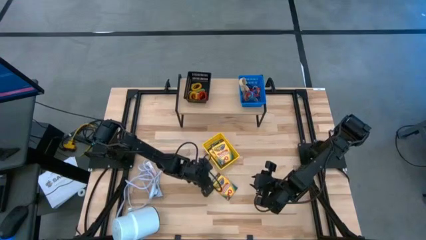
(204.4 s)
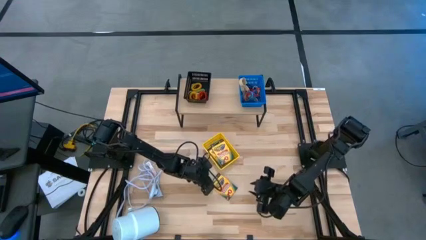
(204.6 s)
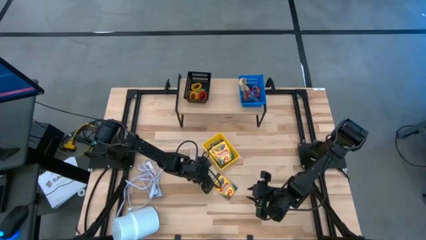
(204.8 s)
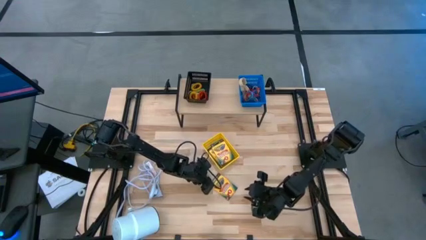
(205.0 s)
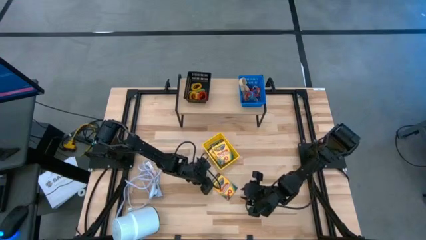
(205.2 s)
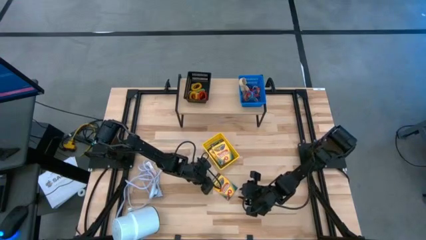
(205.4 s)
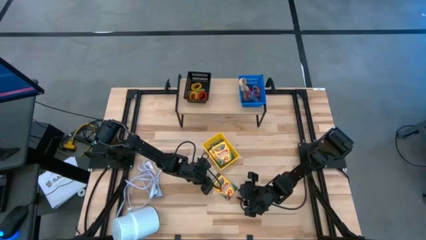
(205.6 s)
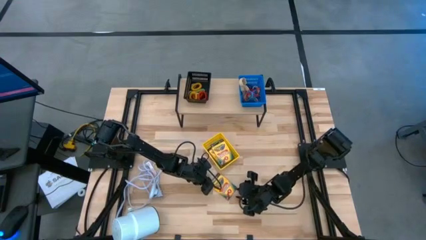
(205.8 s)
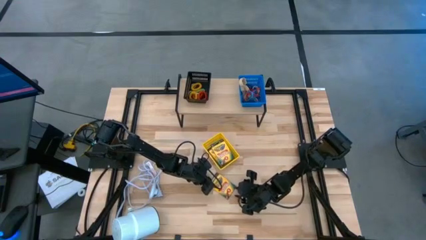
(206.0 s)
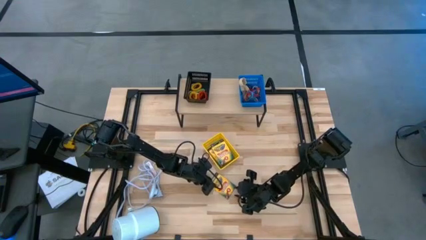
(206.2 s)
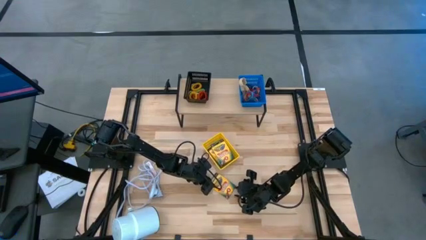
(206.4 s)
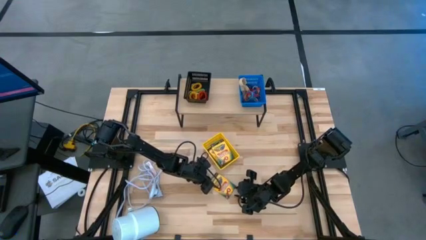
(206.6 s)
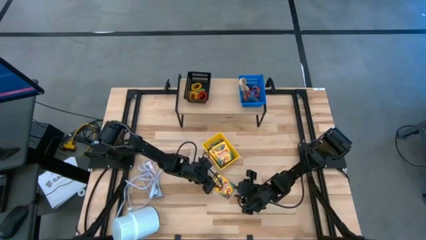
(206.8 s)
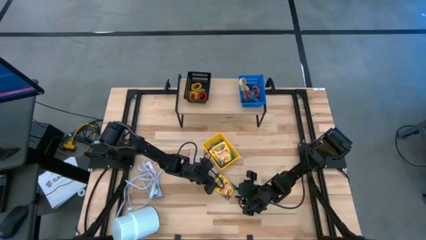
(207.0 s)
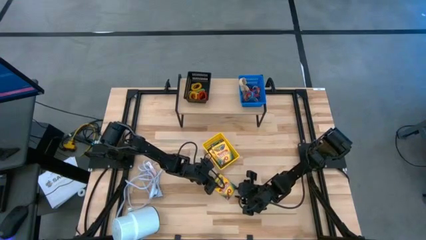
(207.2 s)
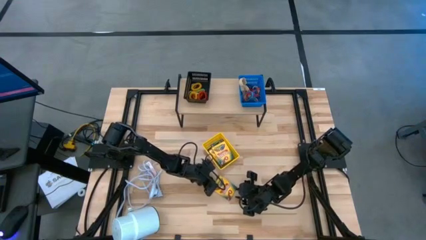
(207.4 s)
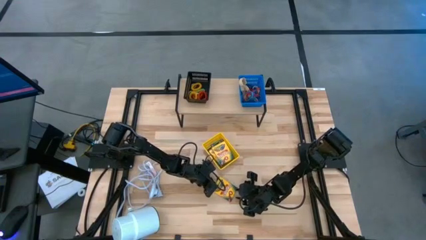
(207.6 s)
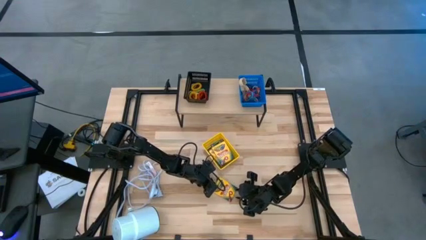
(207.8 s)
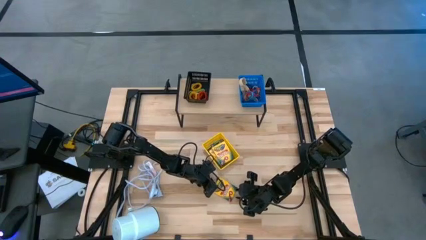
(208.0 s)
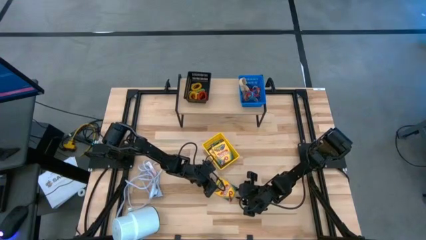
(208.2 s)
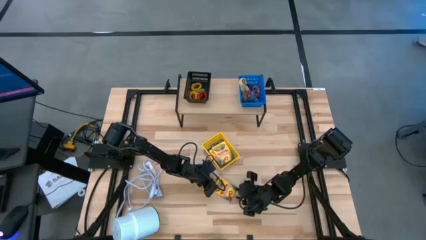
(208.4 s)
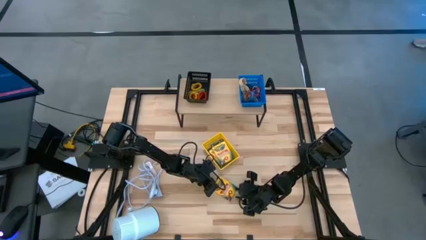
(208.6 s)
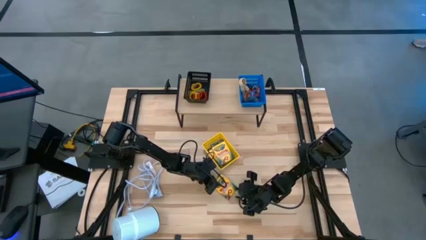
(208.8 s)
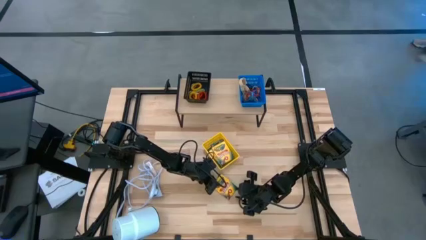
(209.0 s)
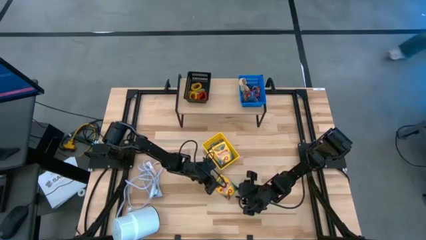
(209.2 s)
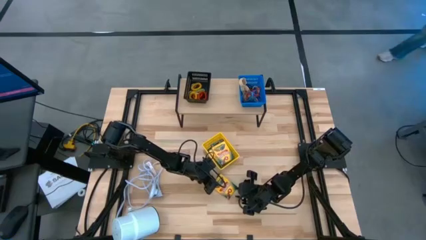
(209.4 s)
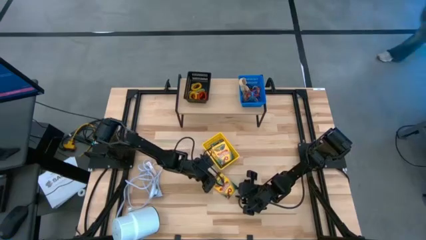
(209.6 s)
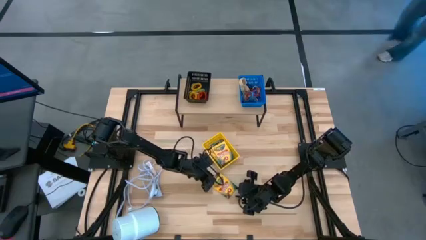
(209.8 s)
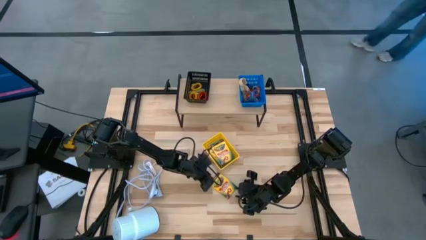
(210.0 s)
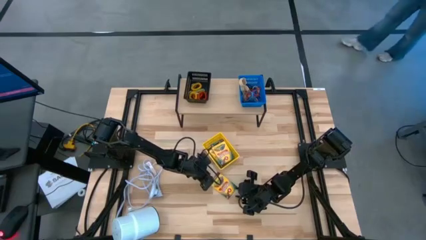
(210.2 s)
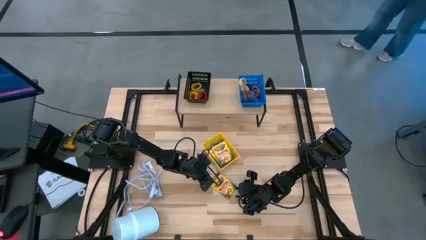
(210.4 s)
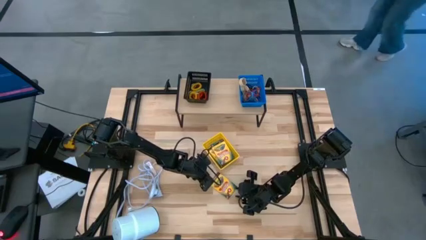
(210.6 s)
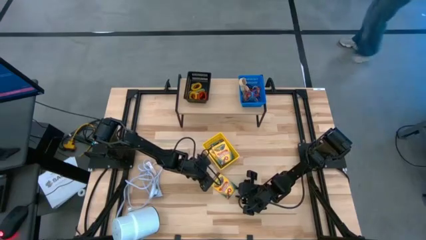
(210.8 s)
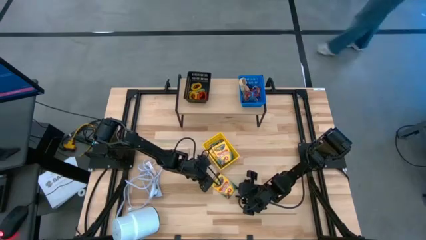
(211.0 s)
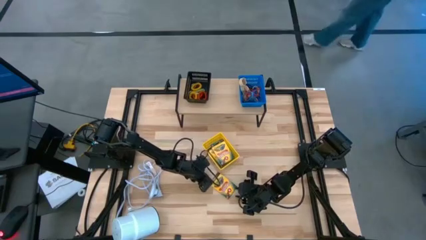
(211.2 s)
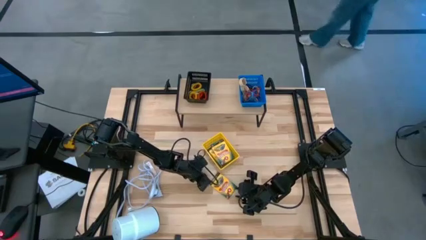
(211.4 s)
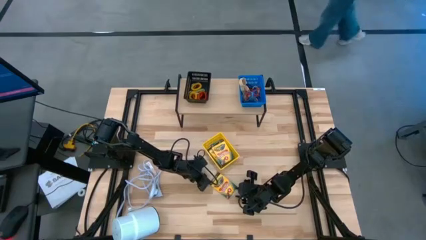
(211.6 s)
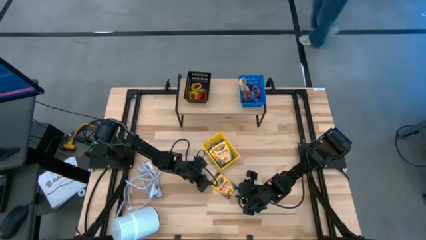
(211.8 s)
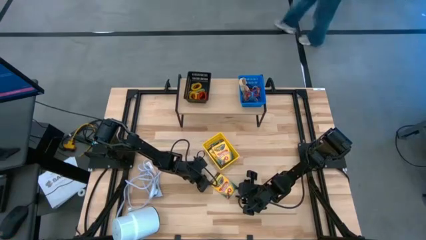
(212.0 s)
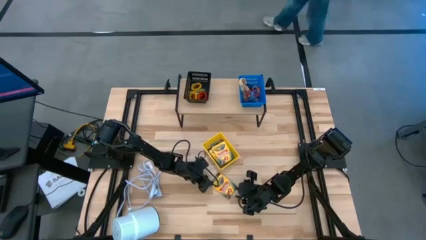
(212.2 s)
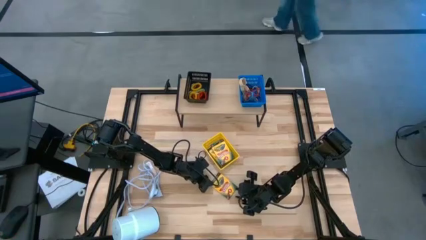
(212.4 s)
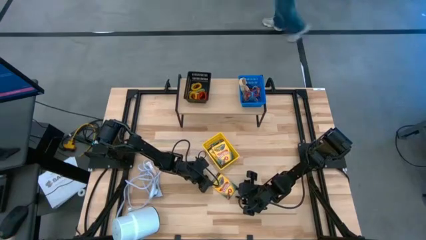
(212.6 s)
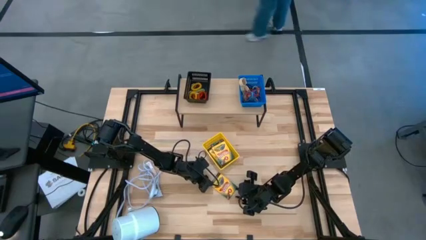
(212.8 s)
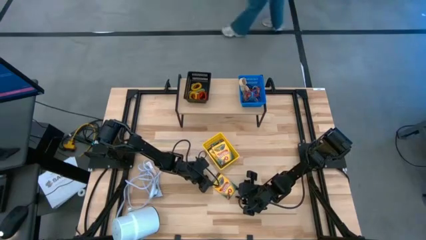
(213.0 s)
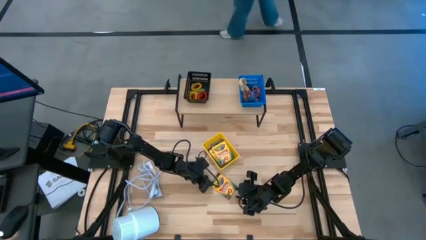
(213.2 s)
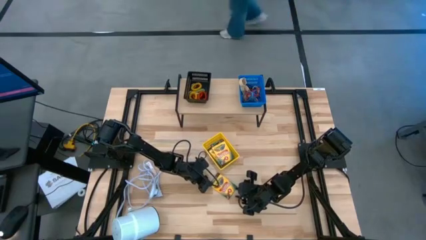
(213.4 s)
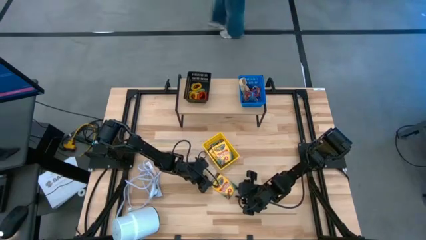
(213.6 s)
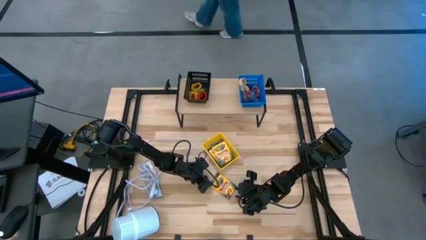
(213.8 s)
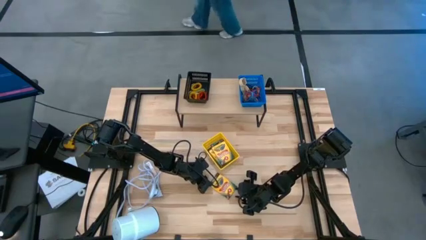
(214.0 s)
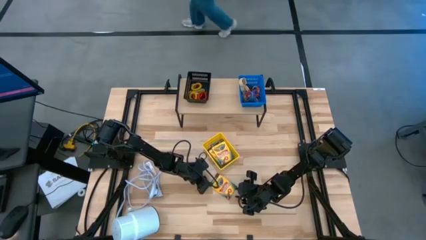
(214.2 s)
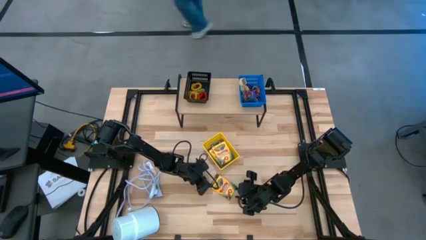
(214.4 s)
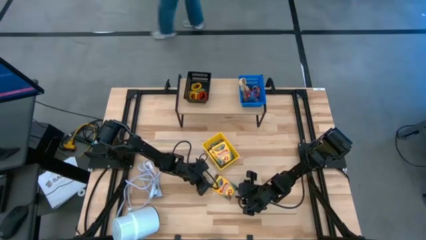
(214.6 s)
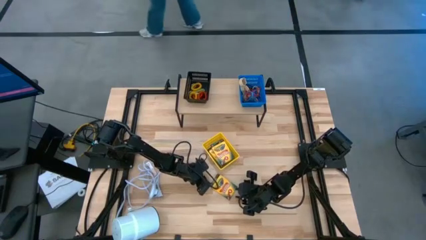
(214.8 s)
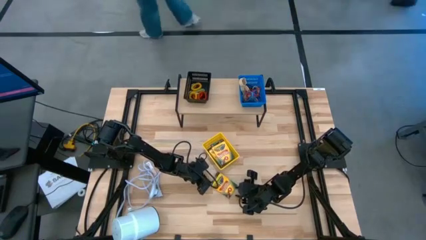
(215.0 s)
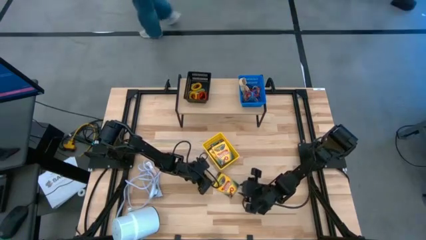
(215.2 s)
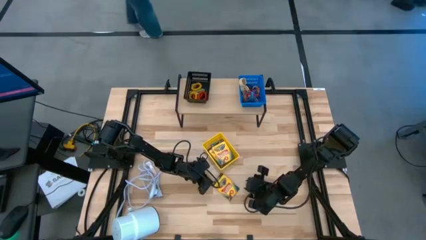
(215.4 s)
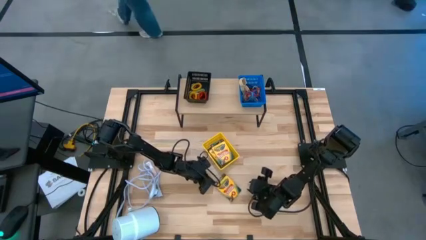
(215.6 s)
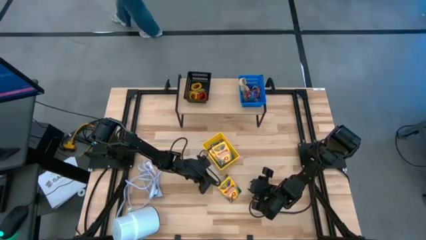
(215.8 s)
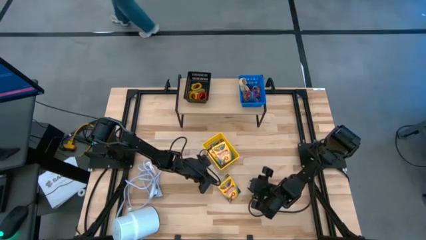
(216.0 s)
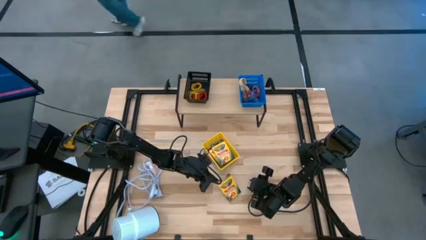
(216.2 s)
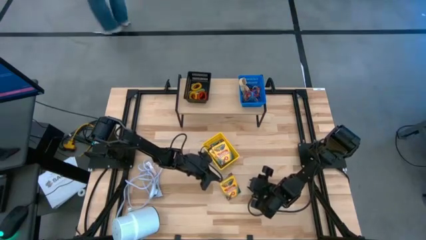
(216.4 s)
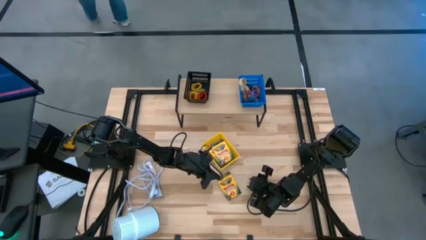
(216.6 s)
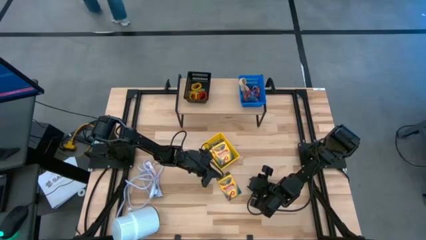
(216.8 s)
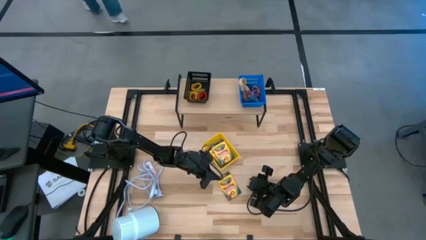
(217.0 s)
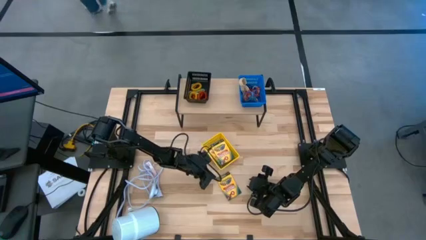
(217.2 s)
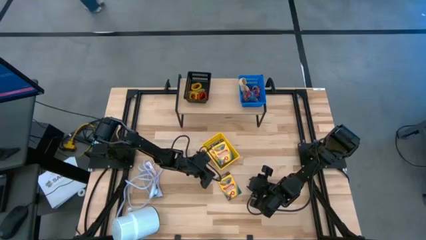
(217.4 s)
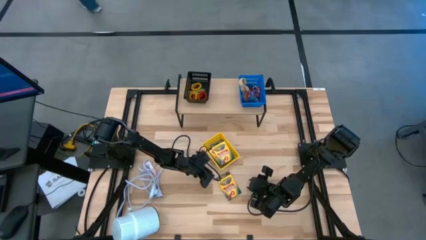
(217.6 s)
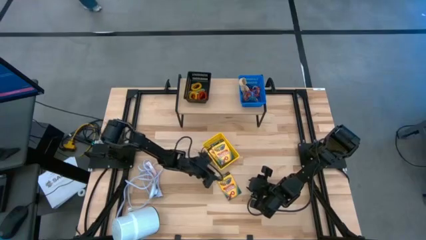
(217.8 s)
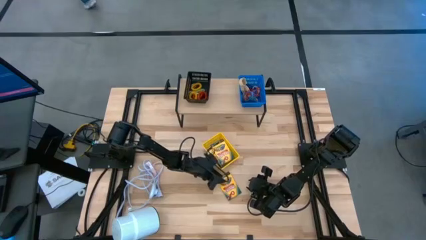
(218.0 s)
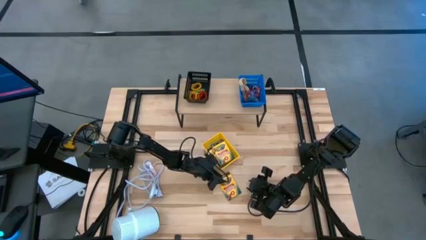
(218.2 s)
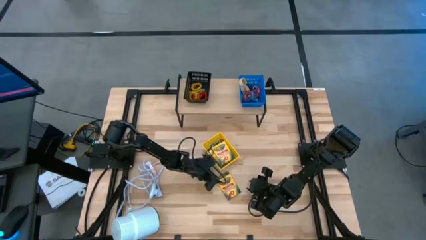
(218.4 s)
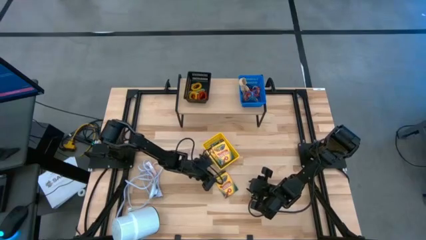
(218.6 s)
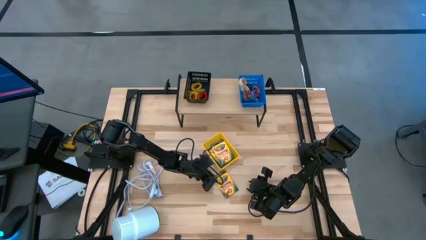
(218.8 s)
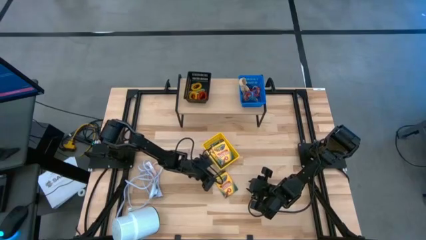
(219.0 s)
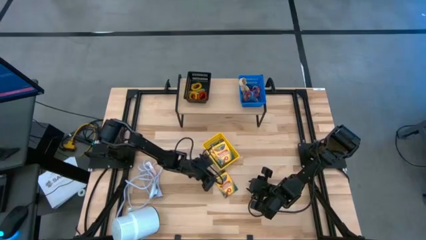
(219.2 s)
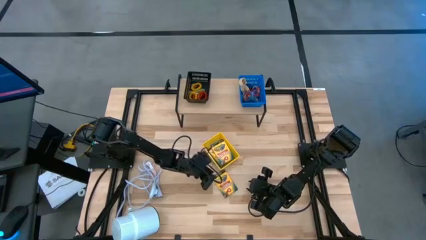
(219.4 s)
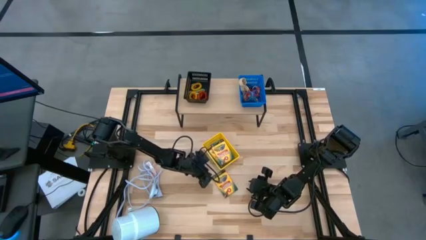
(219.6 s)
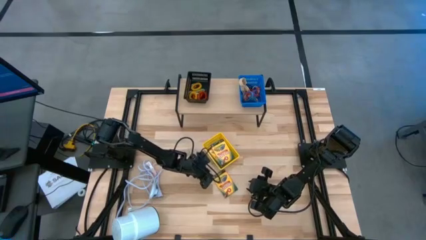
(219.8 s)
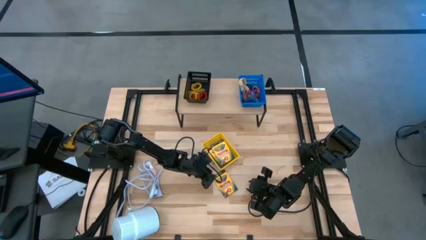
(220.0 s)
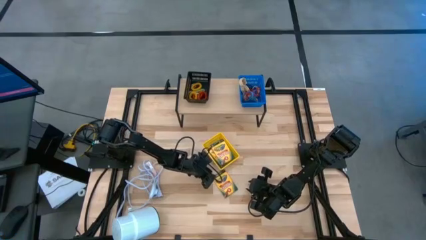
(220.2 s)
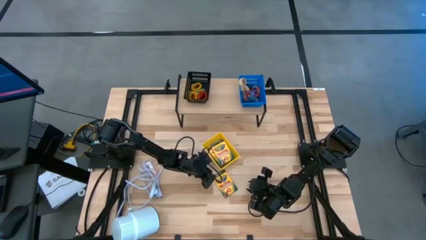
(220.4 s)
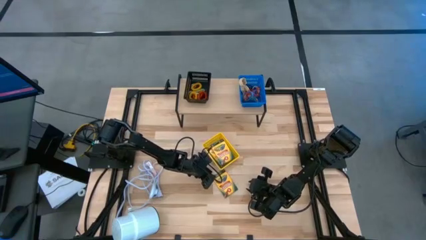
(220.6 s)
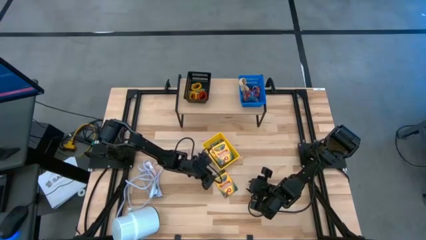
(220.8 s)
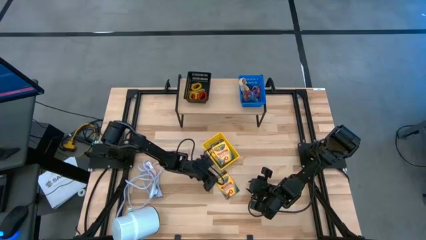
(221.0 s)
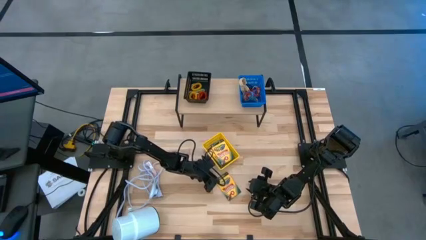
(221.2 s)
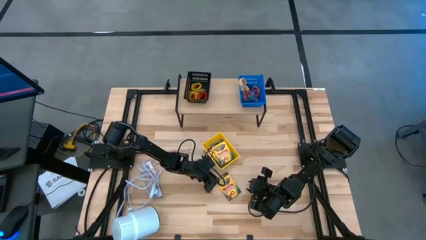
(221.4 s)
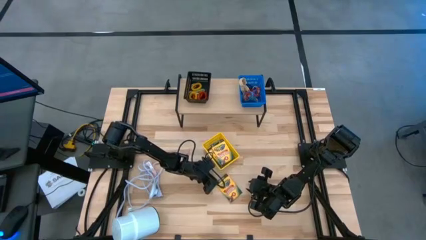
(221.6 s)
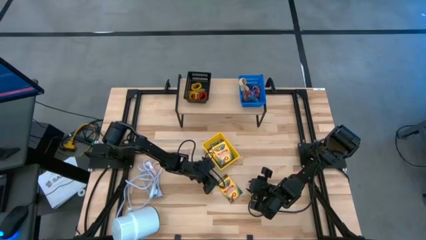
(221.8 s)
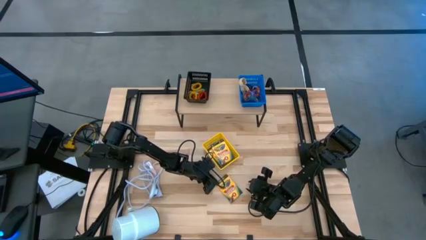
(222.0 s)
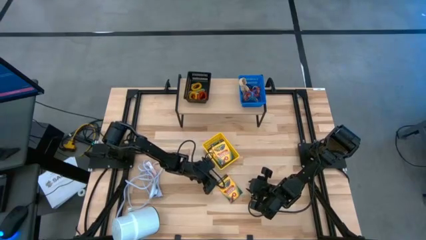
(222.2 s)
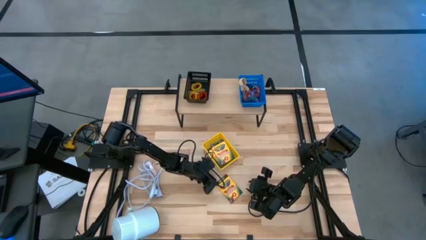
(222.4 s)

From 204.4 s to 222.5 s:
Task: Pick & Place Office Desk Supplies
Put the yellow crayon box into the yellow bin
